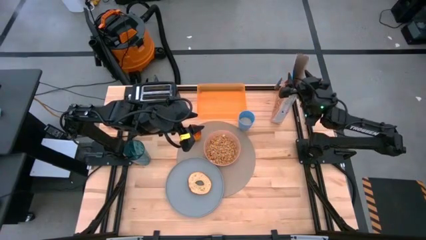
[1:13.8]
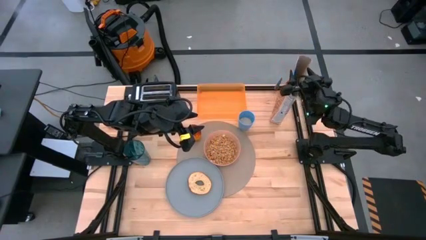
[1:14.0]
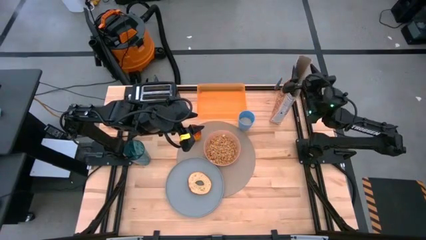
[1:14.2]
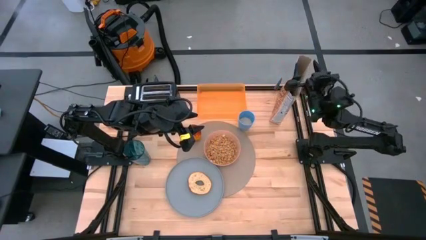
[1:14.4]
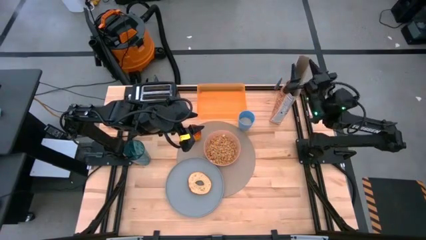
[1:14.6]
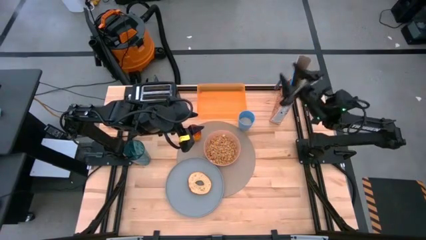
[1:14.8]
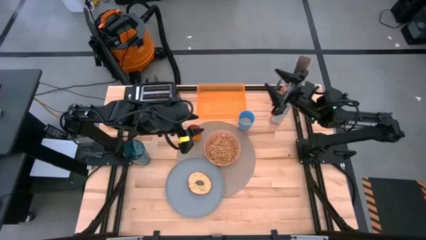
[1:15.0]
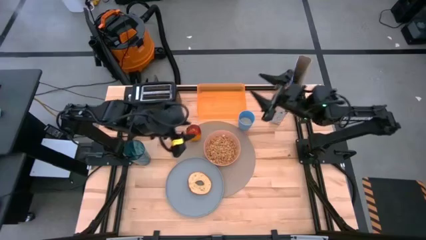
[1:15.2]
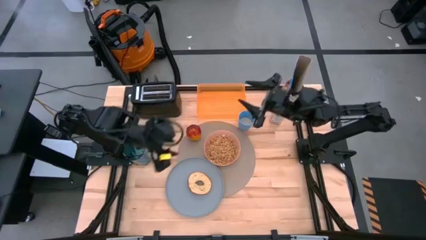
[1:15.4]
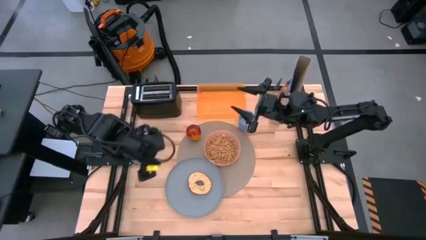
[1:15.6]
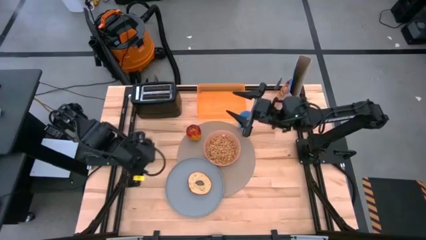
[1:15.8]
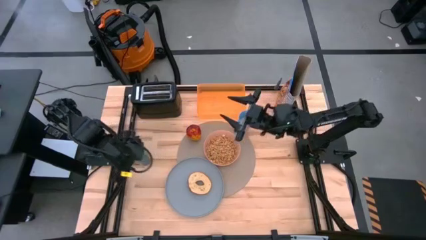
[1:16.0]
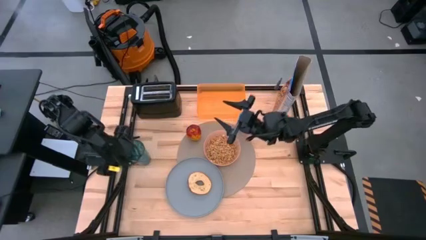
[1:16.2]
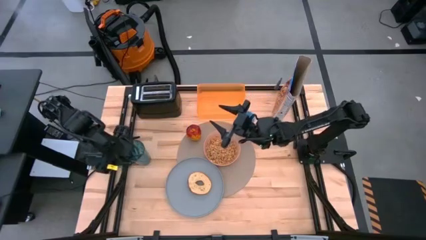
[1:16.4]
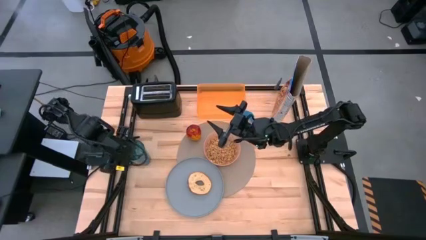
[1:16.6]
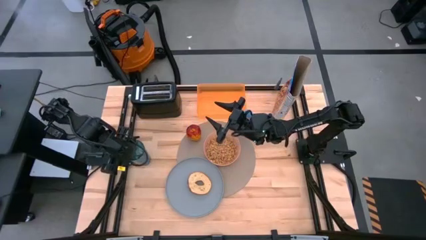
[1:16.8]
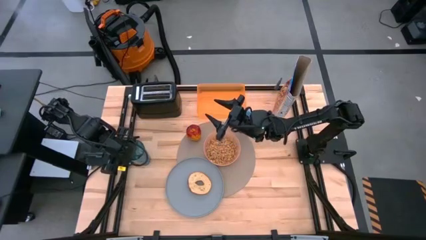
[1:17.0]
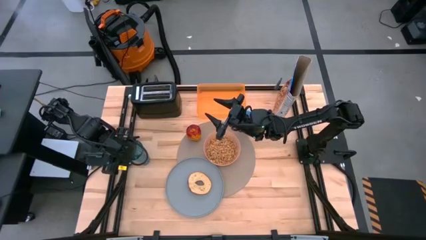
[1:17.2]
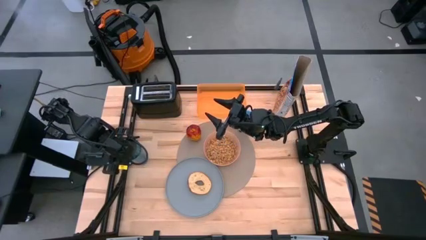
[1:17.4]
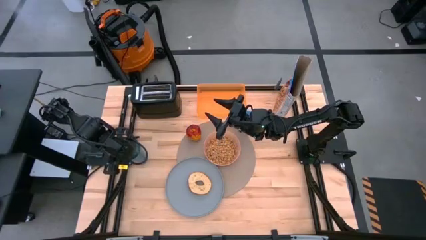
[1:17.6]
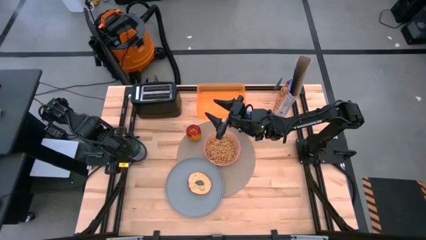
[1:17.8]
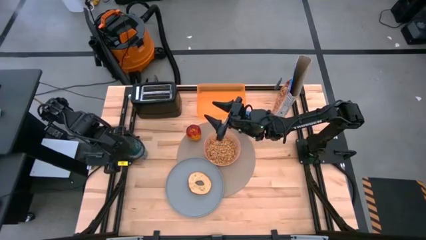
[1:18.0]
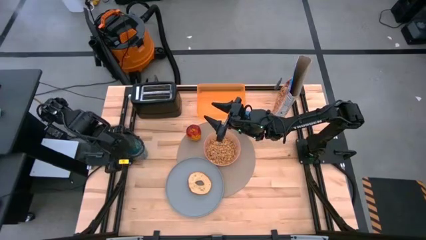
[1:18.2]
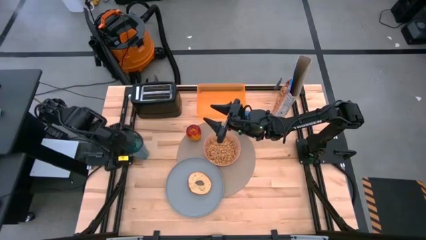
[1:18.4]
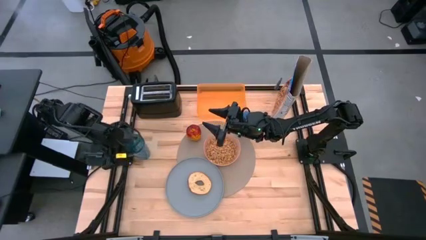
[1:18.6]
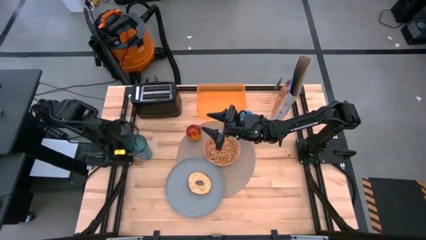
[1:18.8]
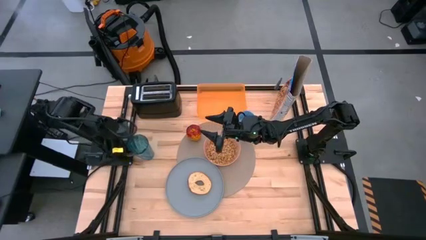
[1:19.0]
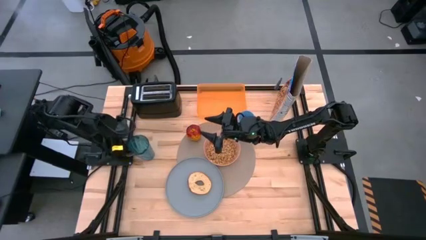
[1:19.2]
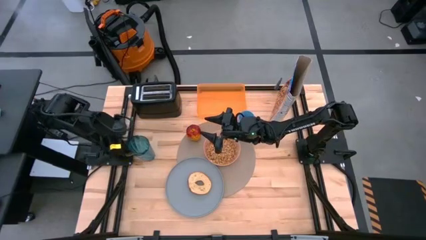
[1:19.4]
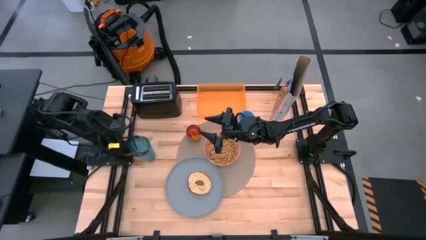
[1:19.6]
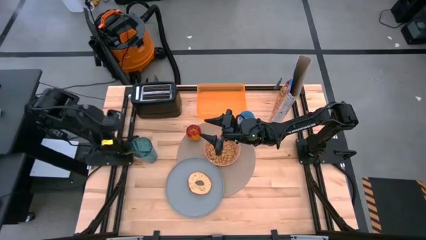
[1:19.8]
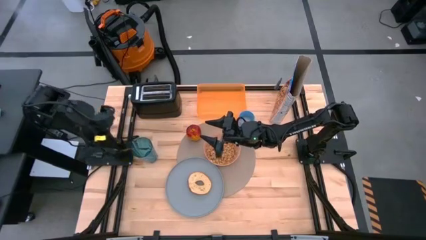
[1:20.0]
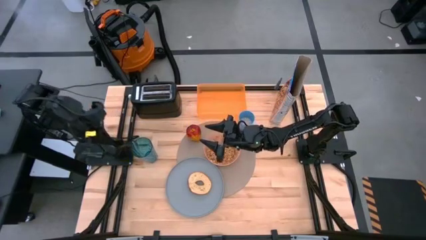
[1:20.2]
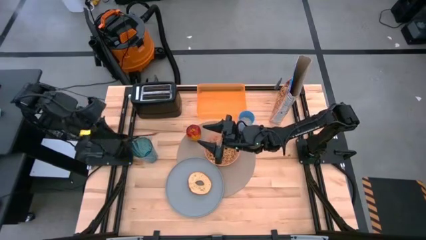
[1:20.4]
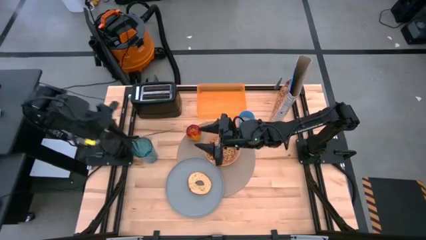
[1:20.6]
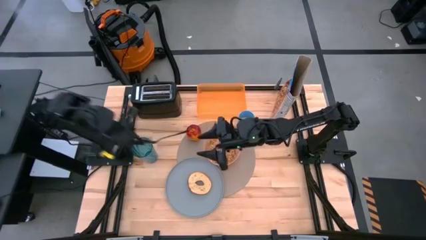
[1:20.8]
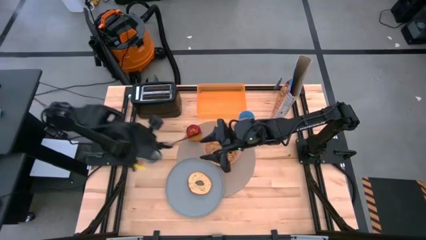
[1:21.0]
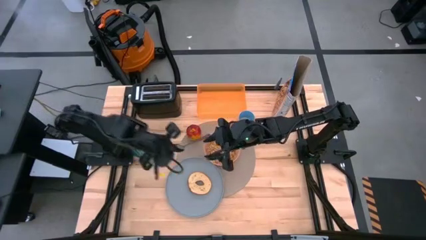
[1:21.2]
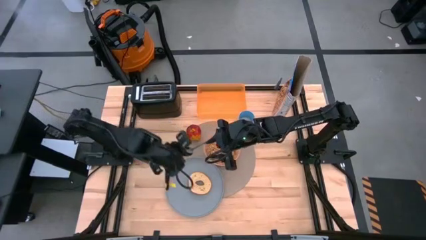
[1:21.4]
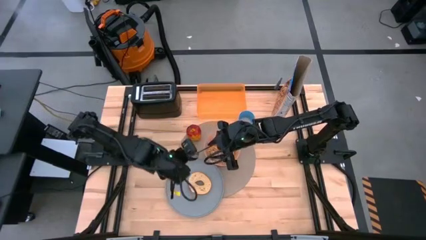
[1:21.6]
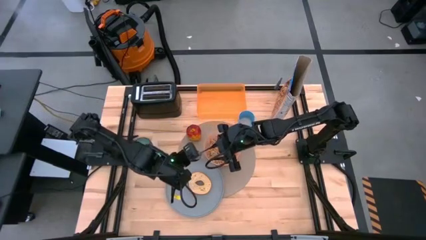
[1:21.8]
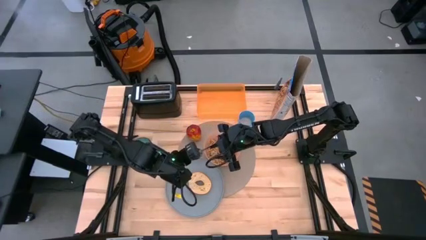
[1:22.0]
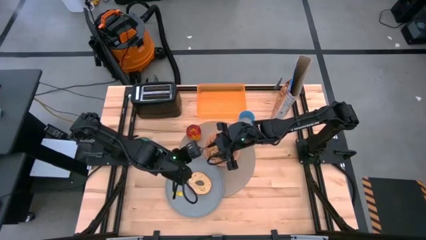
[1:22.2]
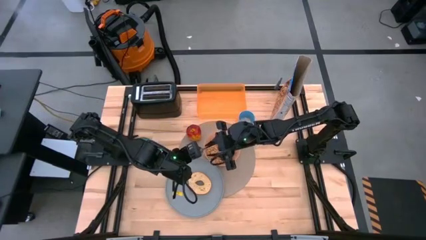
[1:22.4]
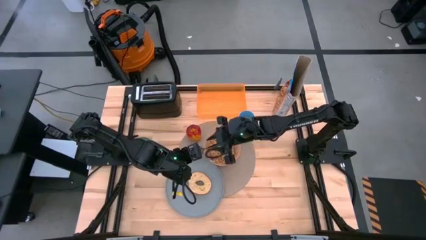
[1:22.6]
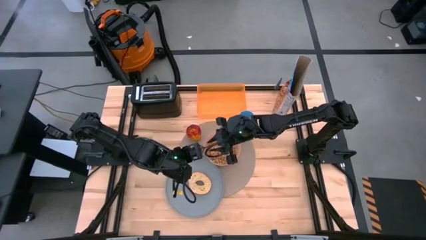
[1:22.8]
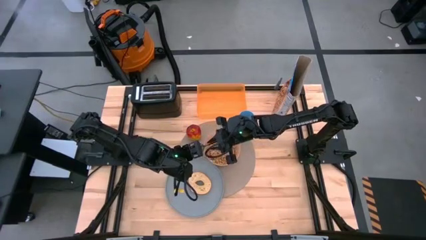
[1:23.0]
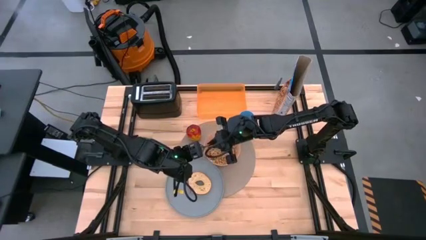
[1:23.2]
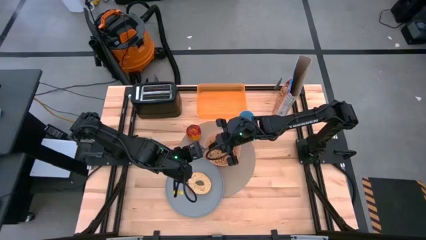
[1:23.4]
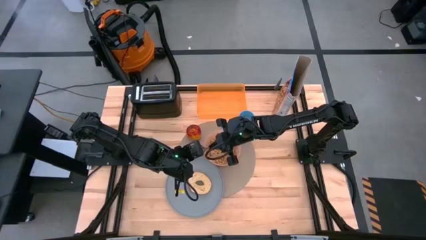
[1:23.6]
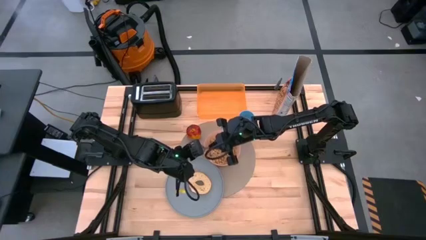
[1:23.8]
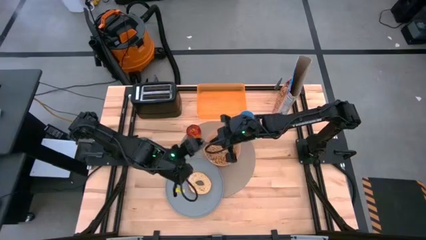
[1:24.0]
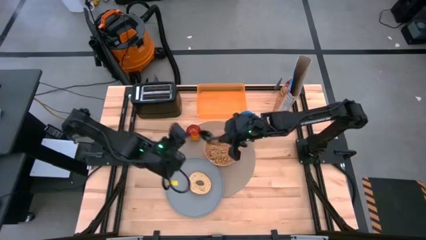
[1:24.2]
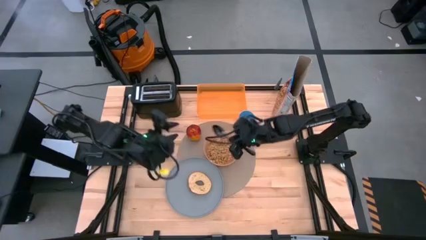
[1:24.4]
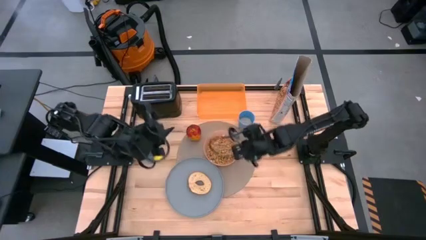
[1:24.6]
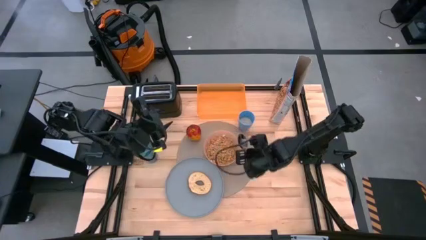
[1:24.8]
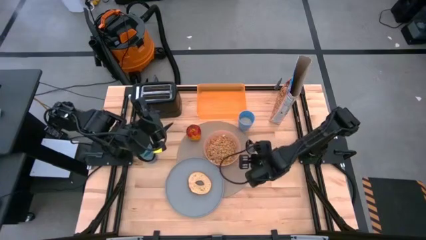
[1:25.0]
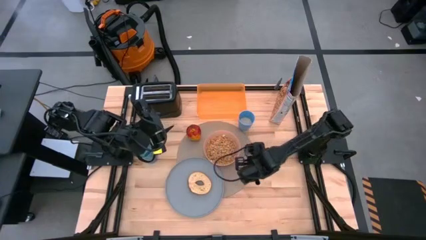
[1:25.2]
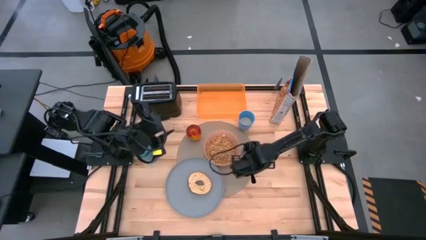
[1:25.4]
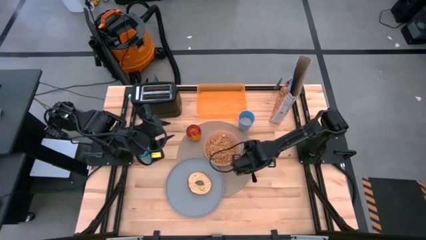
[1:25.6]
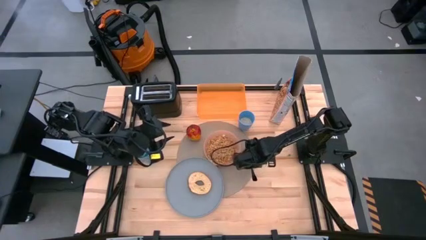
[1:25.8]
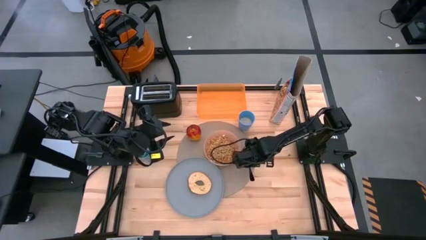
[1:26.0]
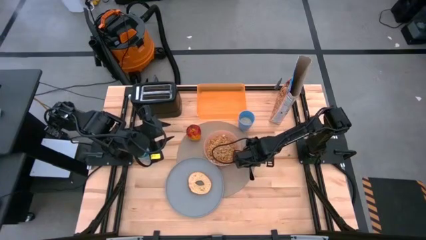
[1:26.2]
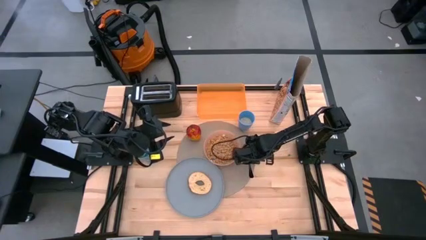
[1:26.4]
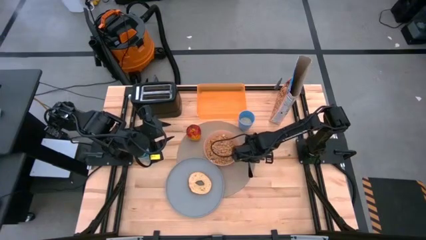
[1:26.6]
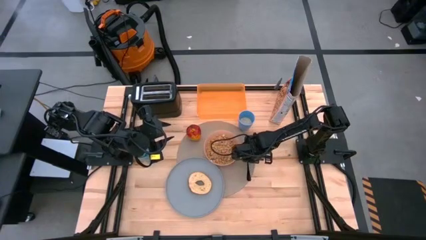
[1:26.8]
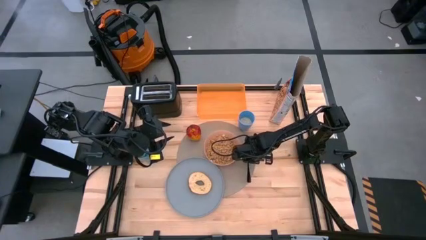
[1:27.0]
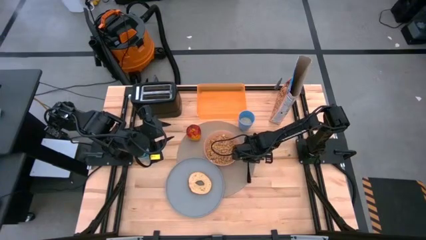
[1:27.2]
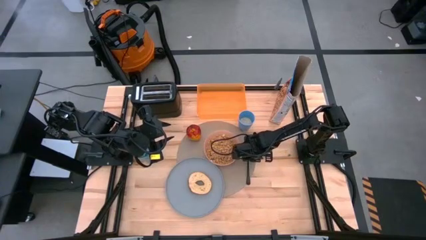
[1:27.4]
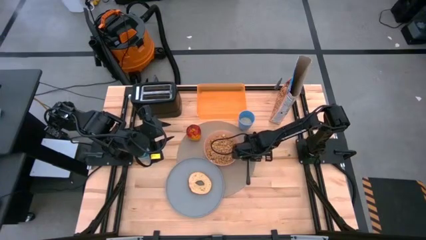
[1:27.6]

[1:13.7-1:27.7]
Task: Arrange a breakfast setting
Put the black spoon on the gray placemat to the right of the pink bowl

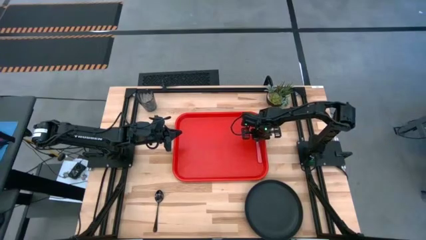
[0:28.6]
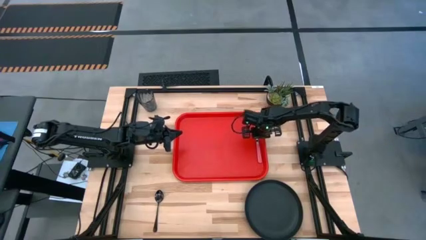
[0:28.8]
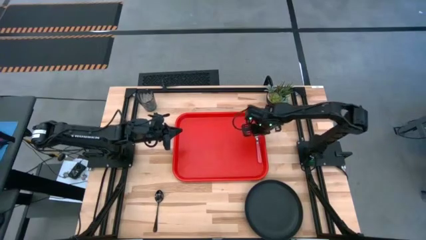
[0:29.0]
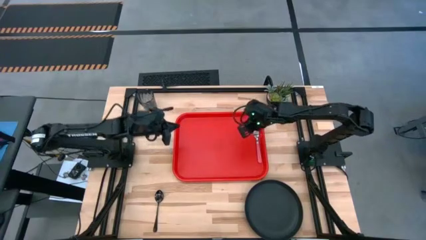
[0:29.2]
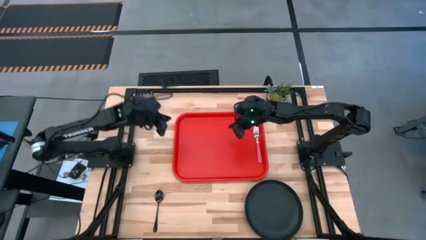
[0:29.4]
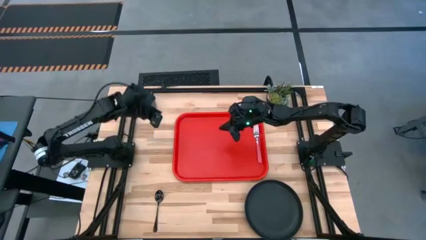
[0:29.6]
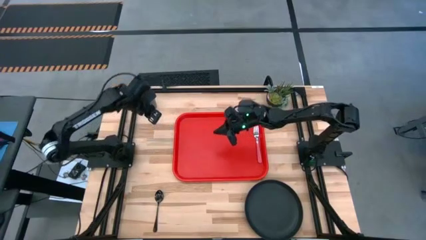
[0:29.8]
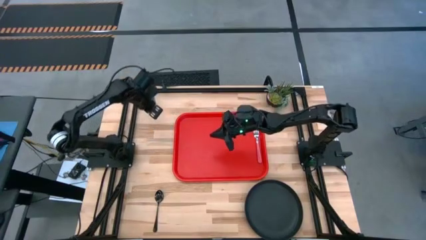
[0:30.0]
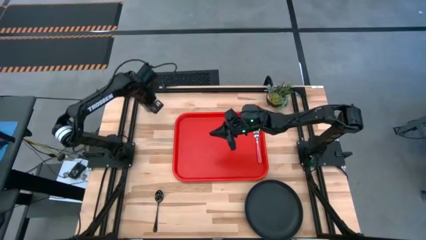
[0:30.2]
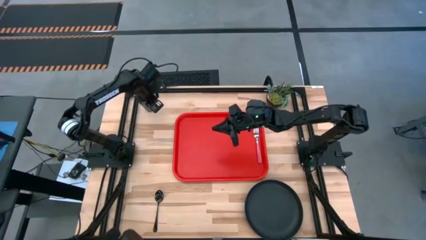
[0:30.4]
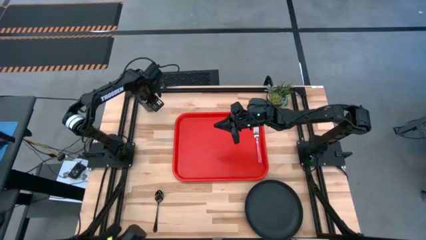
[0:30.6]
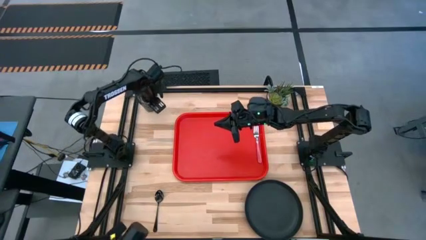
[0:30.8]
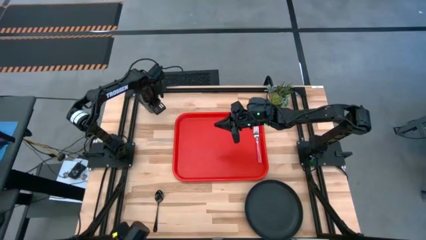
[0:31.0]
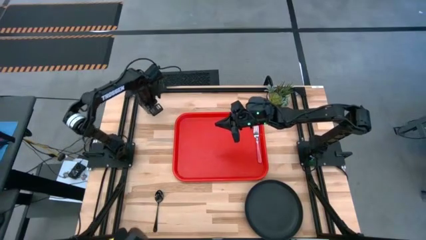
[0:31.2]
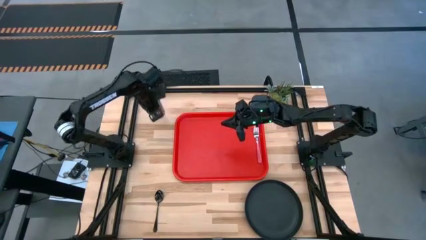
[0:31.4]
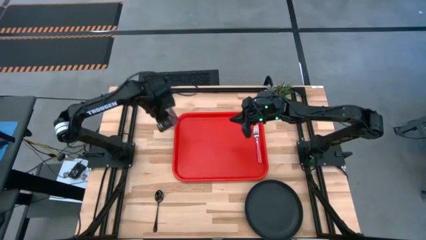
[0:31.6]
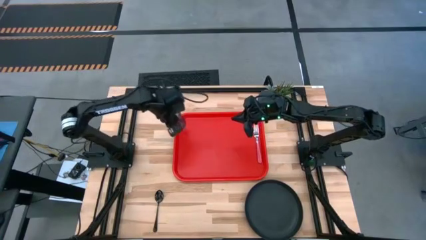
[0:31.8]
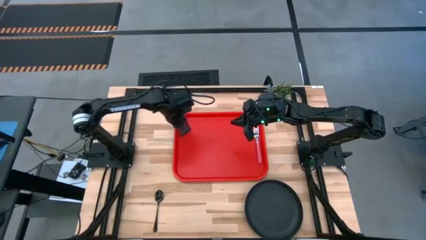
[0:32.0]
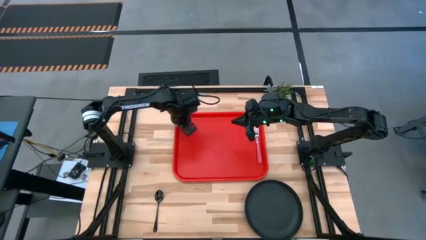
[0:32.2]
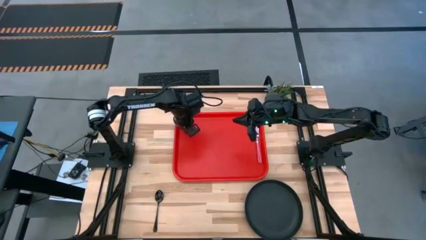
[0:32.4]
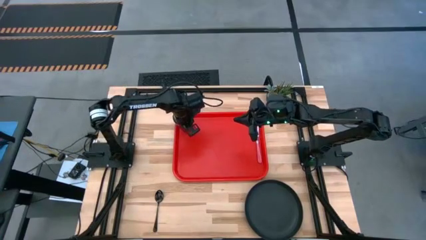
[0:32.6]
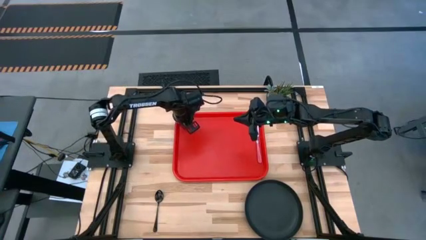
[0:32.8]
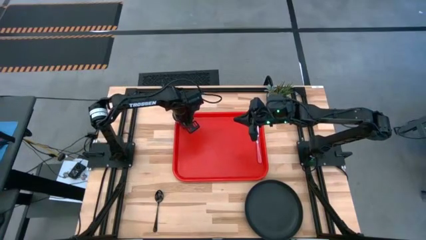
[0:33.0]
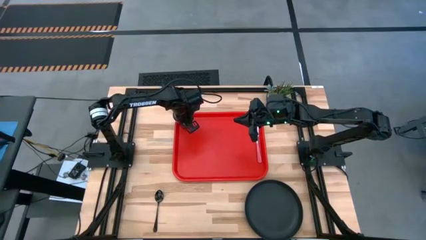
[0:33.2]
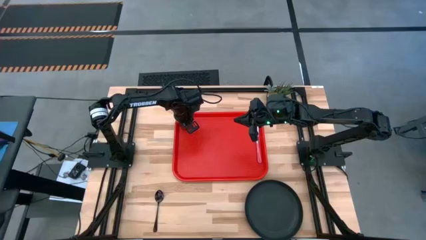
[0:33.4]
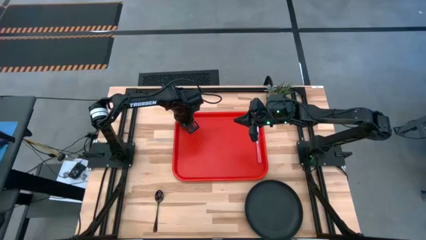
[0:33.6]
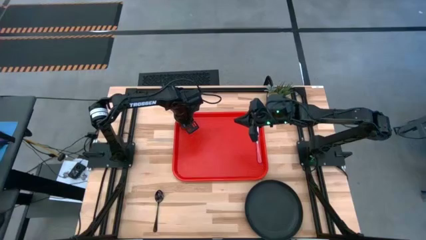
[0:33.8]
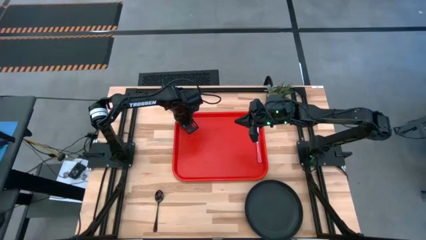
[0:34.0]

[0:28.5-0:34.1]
Task: Pick and place plate/cup/fork/spoon on tray
Put the blue cup to the top left of the red tray
